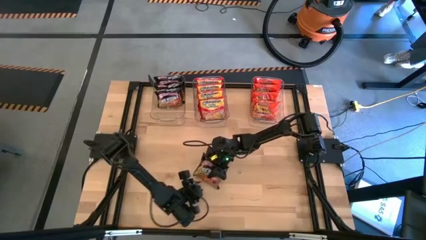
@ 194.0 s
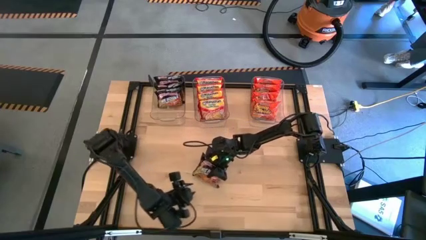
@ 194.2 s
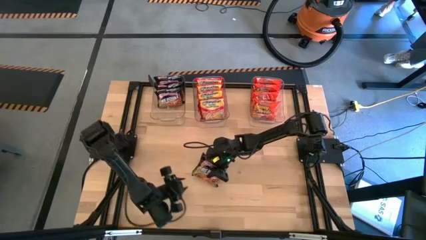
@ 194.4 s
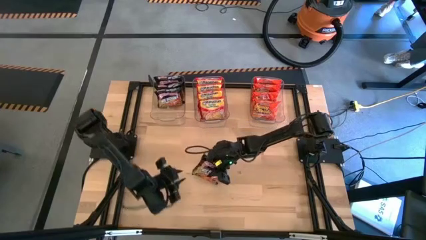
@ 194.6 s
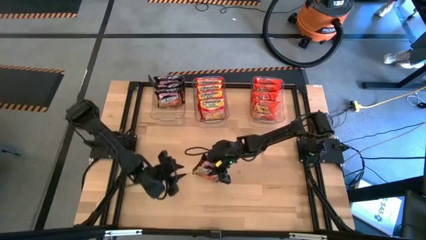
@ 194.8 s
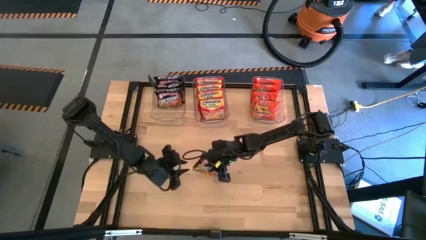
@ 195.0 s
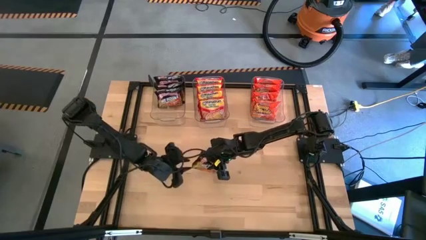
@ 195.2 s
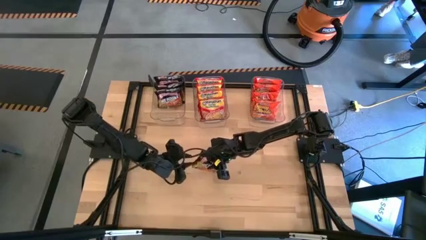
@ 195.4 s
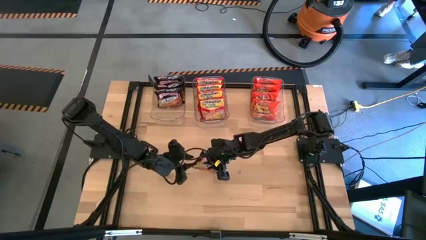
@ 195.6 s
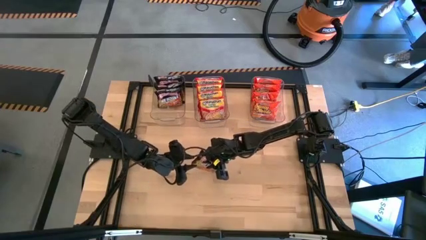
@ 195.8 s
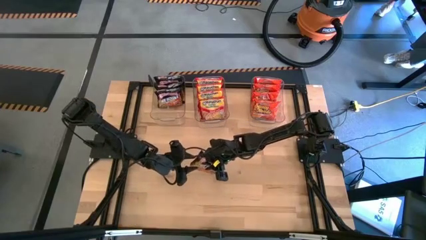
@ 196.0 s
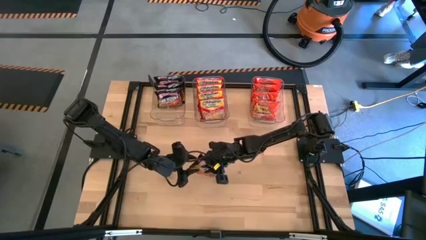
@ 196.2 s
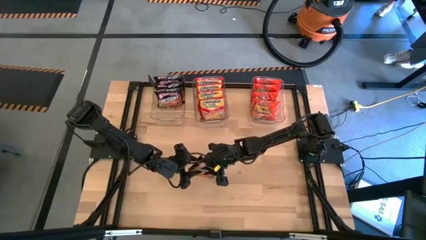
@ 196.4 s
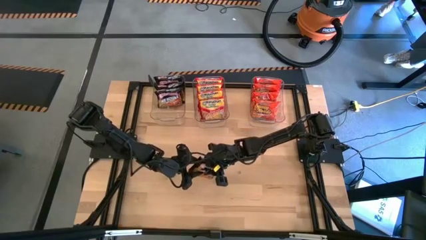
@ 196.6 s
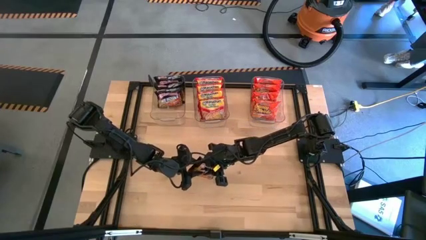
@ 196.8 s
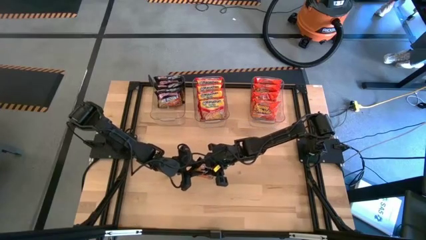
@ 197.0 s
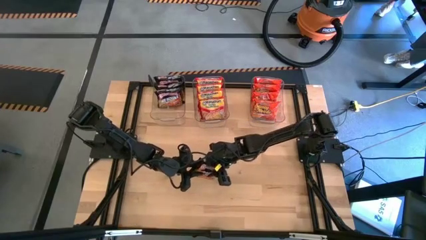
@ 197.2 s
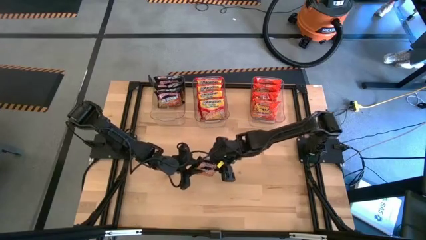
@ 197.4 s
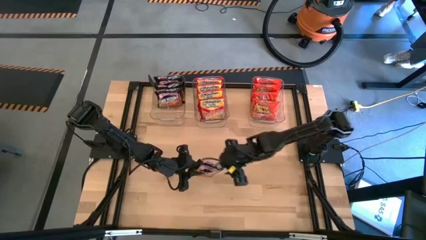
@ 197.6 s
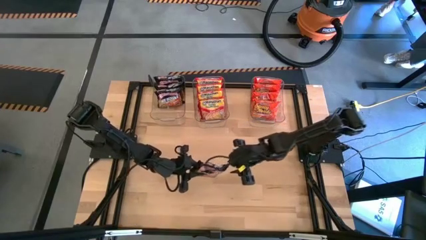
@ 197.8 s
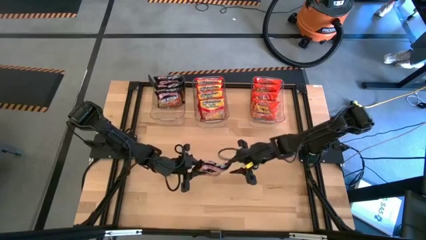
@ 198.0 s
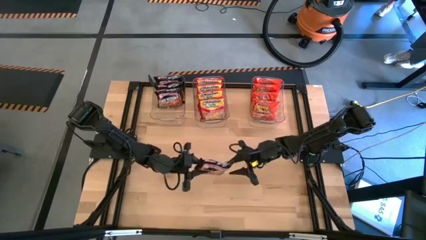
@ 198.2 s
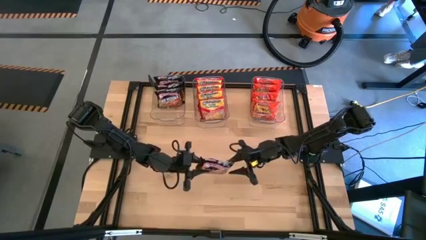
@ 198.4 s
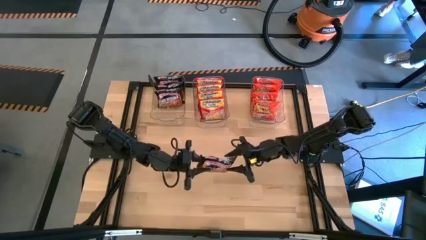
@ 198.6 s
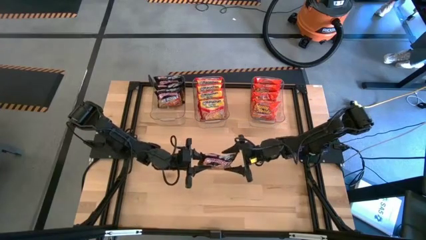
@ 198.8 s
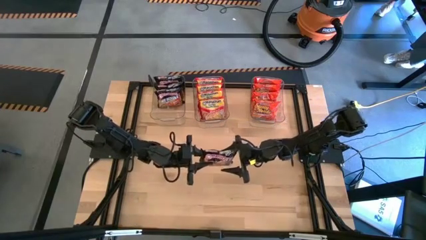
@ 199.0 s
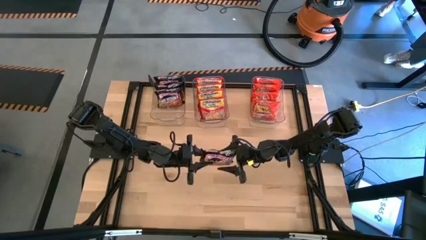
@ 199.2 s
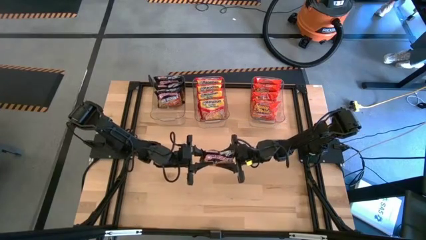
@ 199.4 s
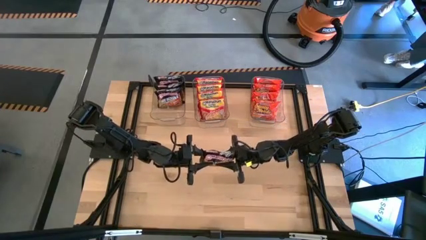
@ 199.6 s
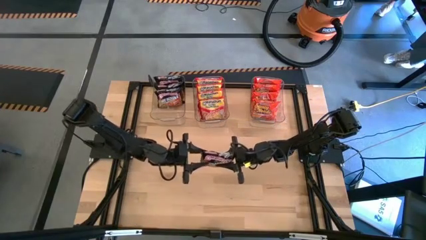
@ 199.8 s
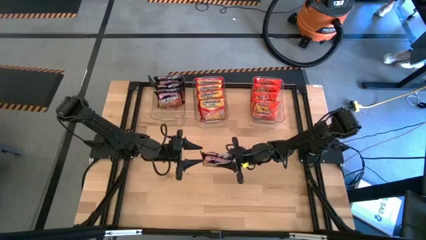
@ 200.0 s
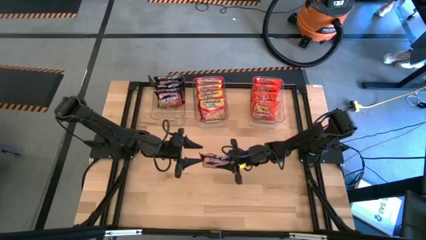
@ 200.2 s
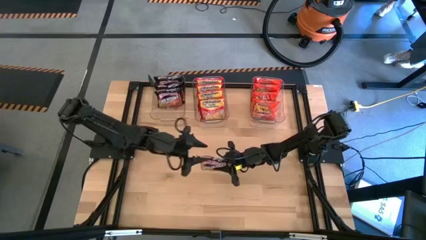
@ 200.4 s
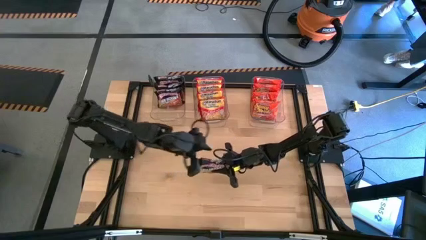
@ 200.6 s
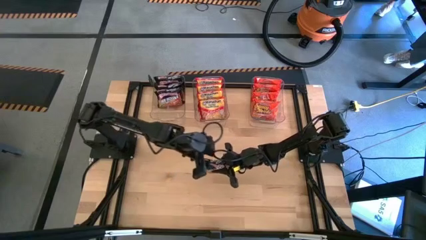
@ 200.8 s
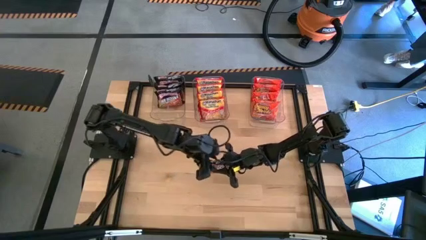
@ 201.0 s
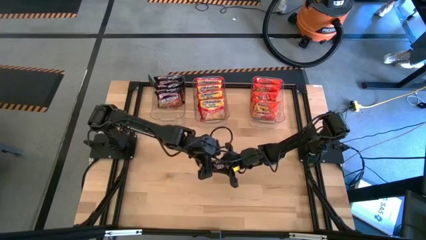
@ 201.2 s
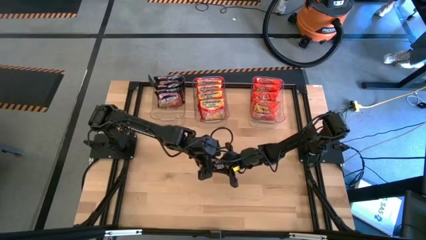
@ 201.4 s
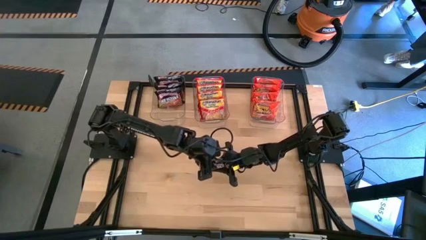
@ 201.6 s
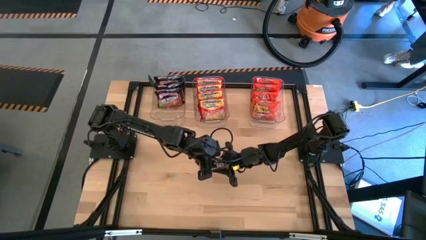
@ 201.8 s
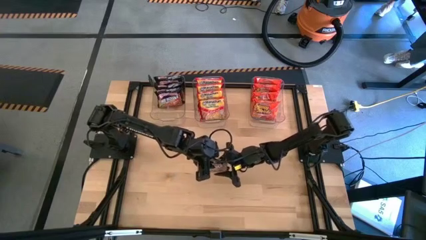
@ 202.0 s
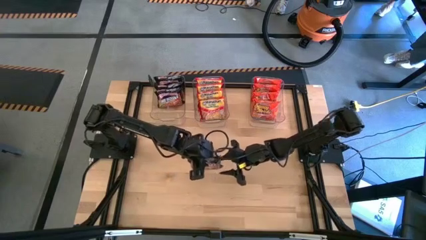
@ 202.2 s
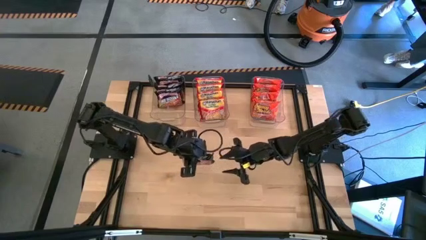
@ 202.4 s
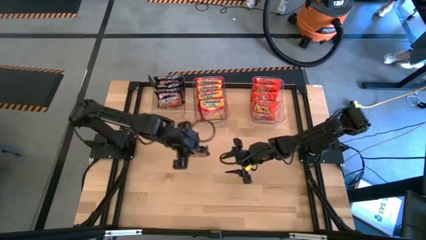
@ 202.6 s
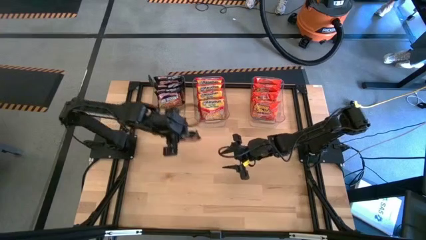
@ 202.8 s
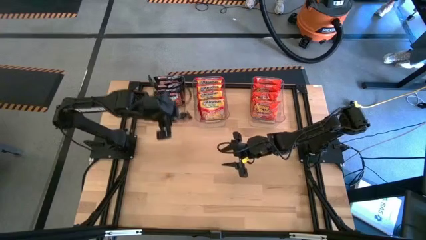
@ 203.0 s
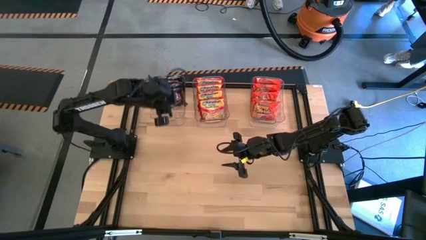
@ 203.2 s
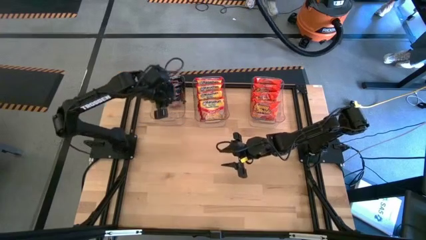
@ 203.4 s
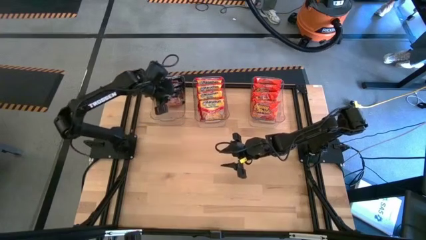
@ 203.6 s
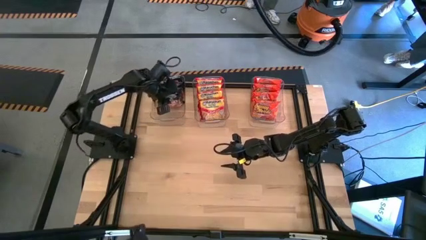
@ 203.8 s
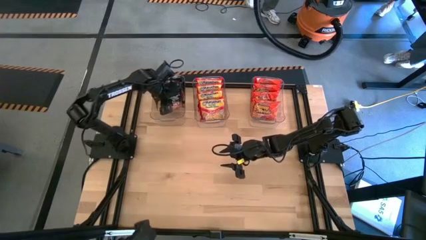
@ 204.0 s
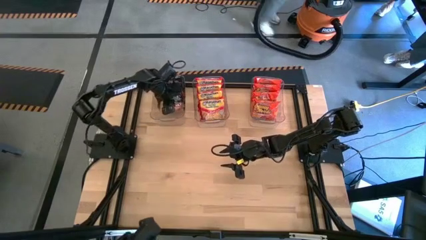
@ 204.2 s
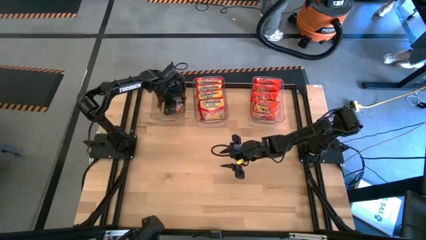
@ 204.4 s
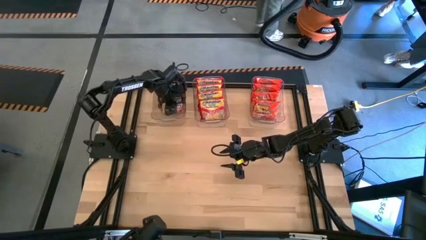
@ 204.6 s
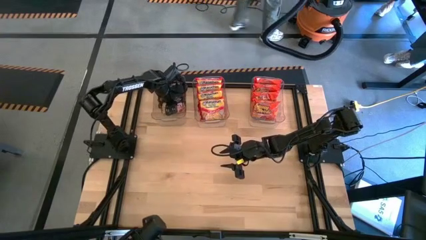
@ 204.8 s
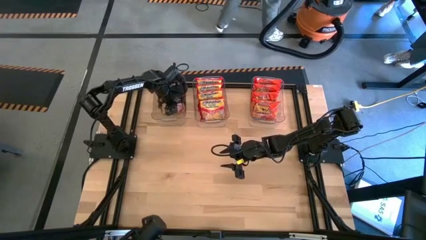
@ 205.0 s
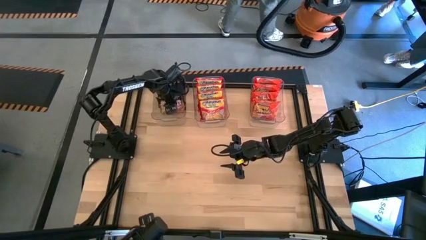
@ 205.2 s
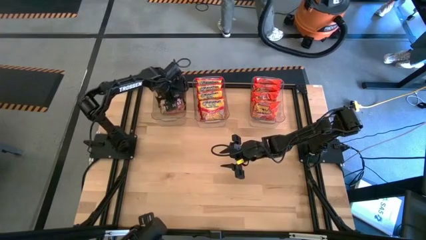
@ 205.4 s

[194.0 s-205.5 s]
Task: Sort Maruchan noodles
Put the black noodle pack into the left transparent bin

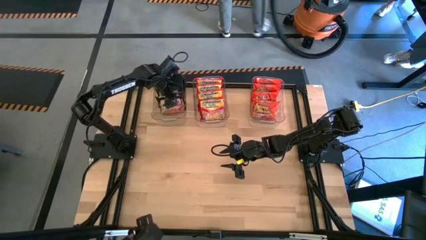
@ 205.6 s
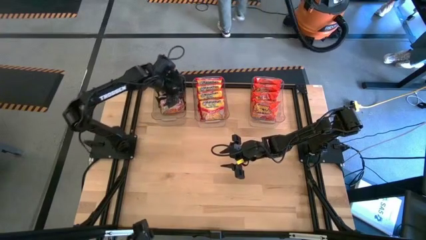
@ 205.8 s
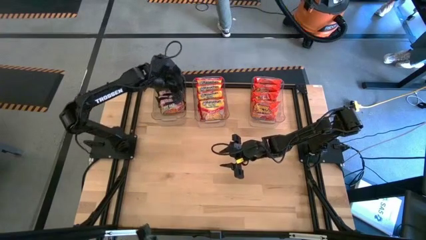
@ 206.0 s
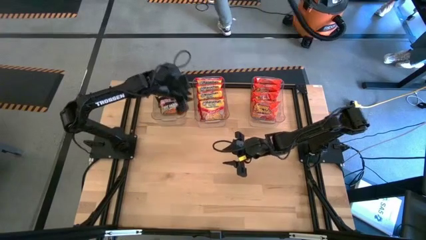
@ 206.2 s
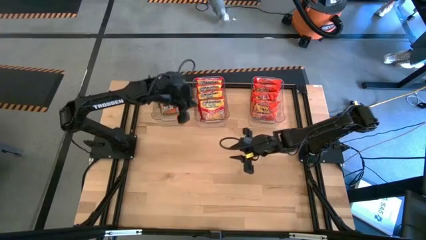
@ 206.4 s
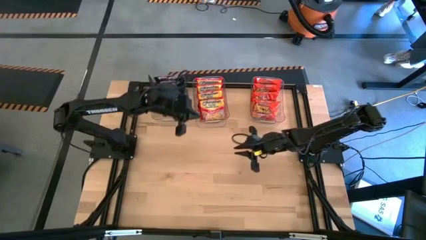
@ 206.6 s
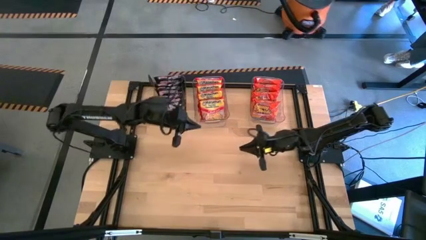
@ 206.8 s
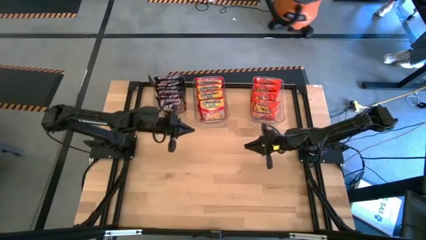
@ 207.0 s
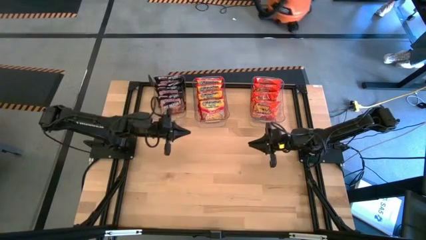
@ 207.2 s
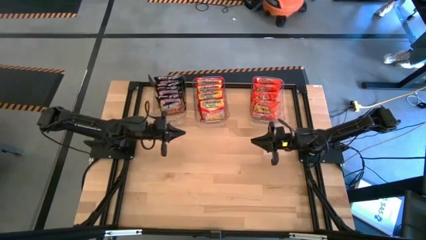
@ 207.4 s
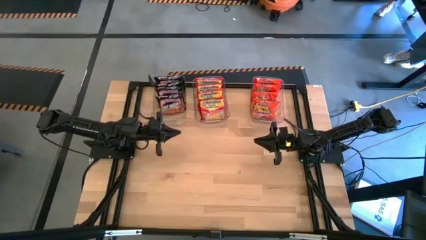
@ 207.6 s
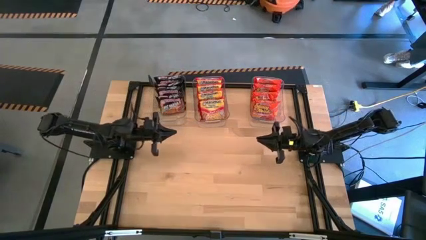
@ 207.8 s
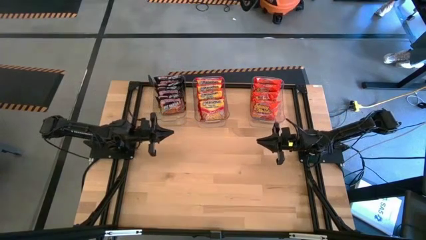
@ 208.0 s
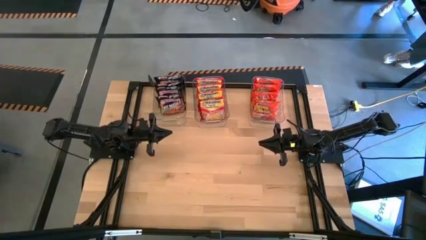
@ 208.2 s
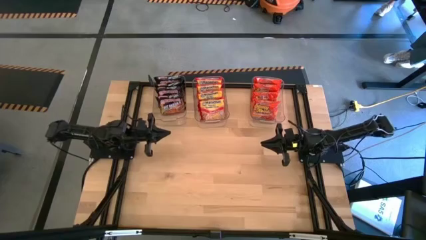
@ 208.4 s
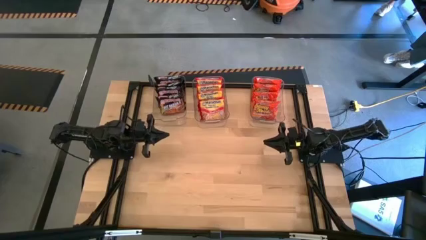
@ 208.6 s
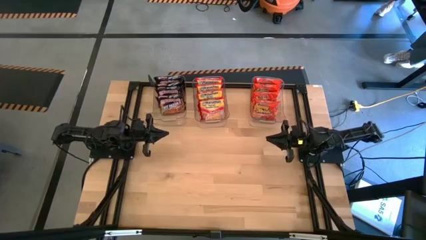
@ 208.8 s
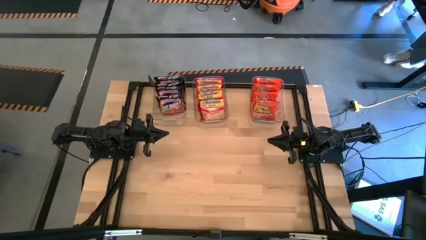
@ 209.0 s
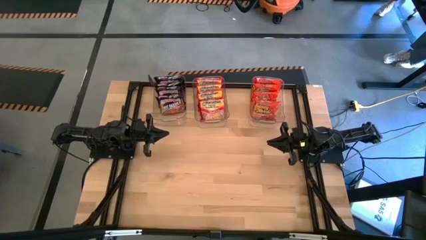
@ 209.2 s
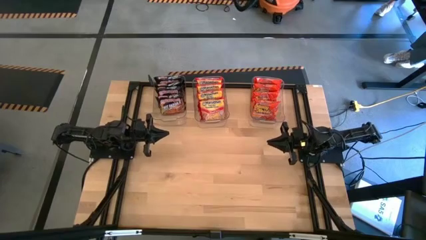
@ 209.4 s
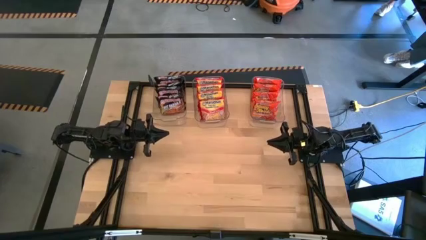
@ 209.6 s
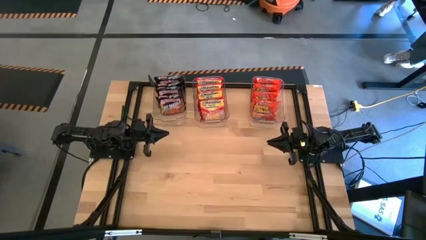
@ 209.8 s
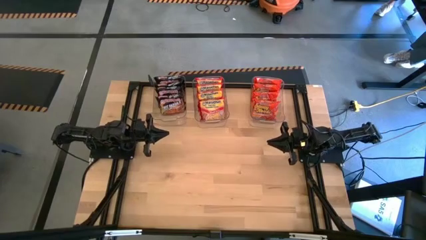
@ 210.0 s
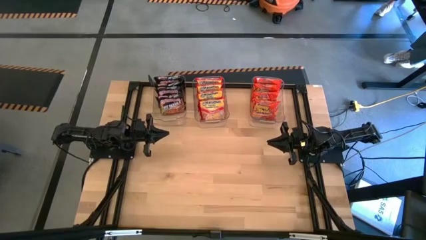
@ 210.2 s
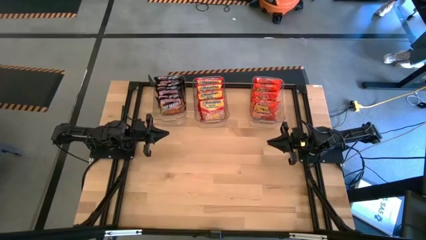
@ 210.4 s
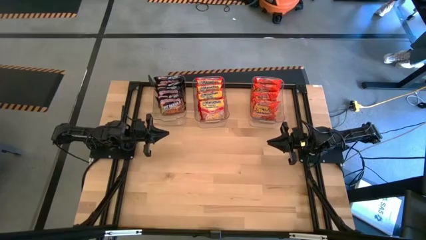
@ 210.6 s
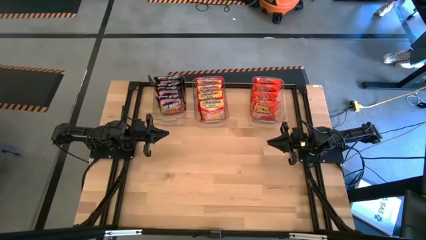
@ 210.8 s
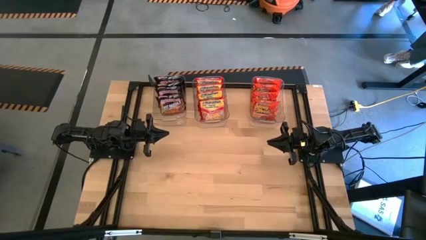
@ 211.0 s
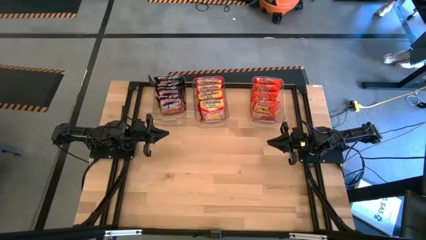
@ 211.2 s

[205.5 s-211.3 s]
Return to Home Position
